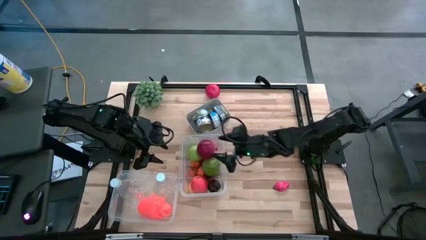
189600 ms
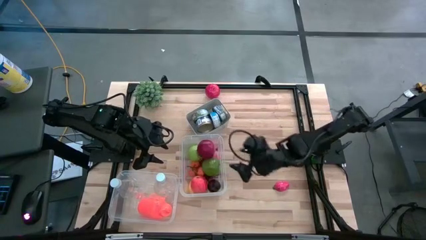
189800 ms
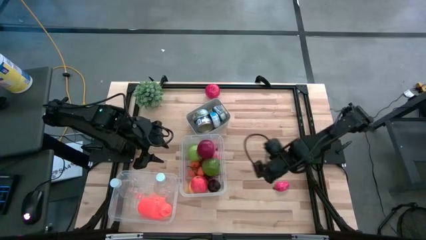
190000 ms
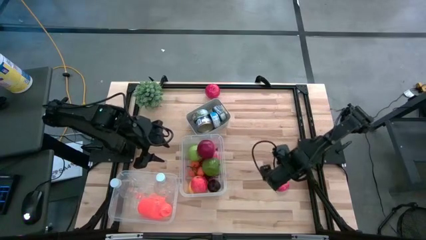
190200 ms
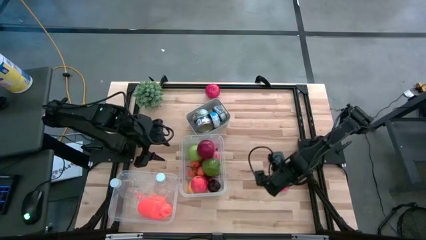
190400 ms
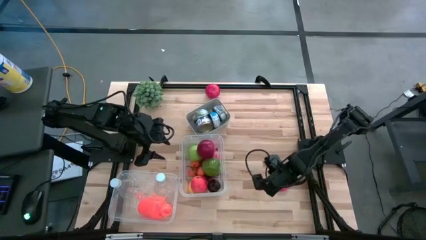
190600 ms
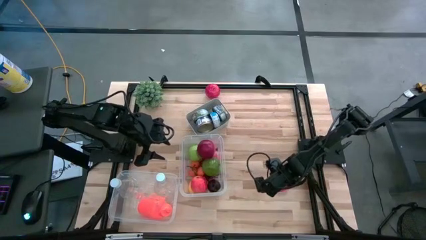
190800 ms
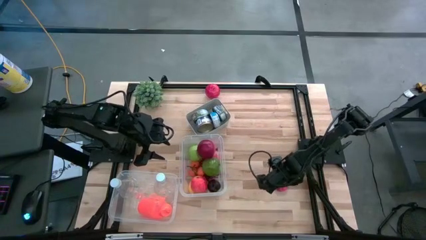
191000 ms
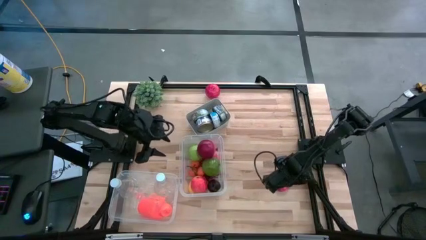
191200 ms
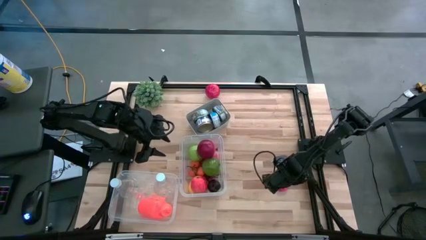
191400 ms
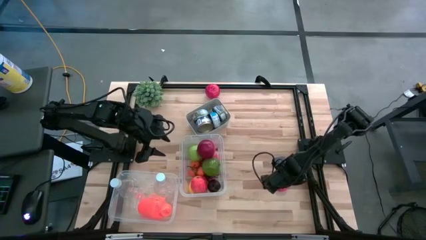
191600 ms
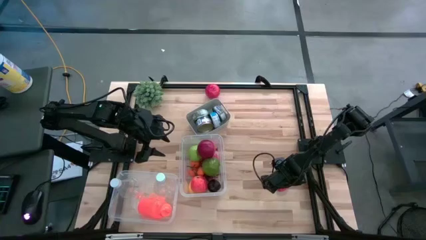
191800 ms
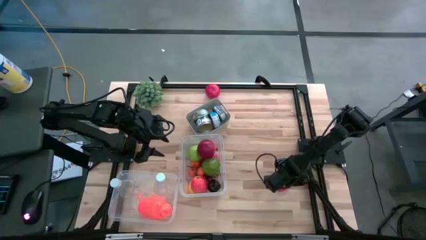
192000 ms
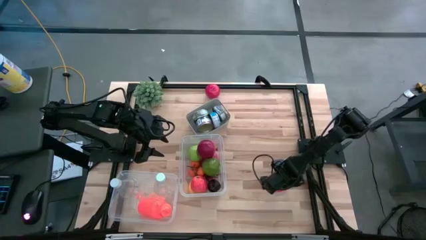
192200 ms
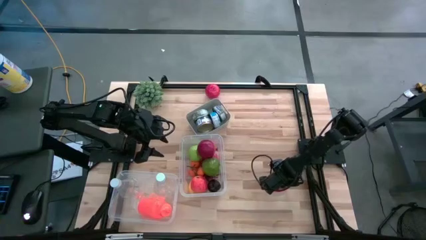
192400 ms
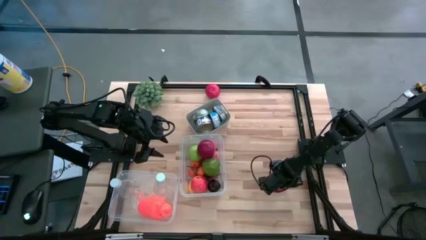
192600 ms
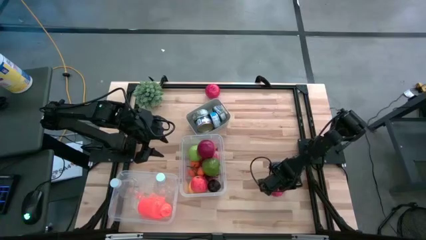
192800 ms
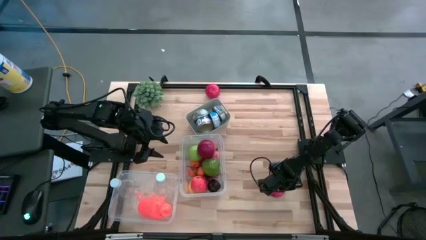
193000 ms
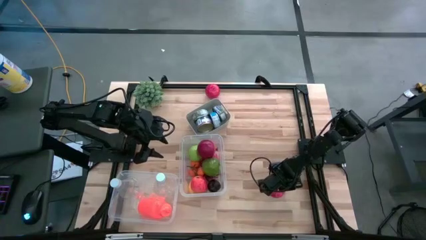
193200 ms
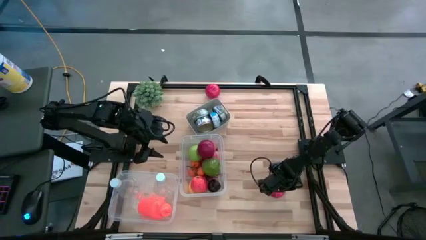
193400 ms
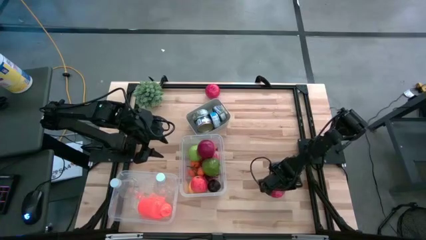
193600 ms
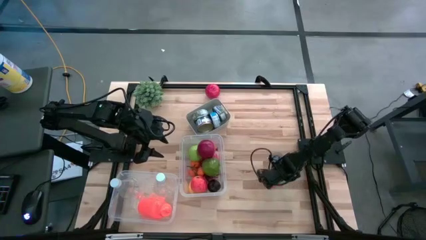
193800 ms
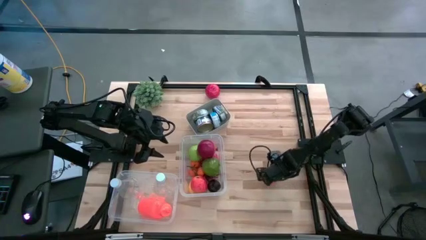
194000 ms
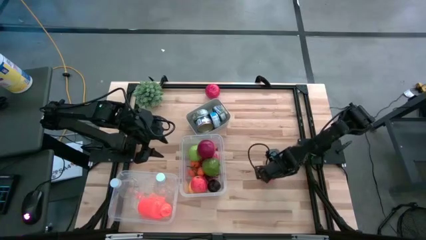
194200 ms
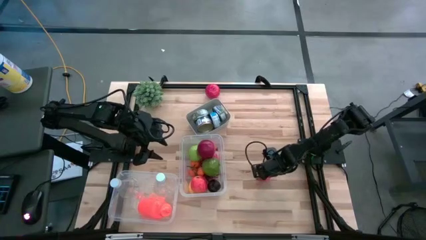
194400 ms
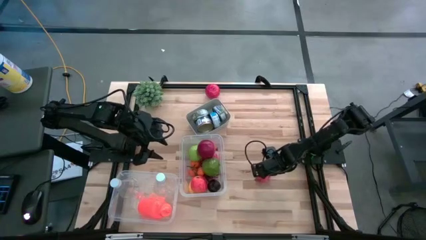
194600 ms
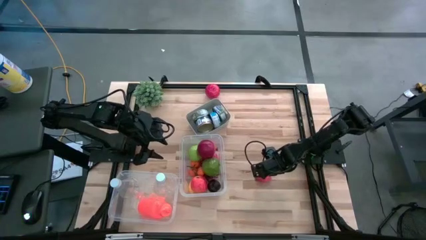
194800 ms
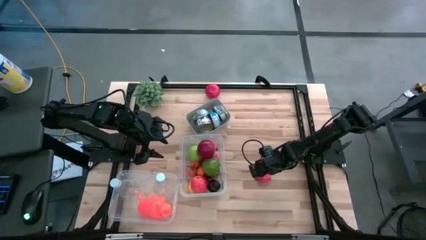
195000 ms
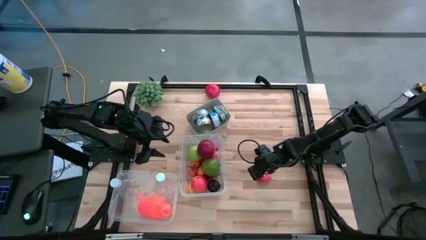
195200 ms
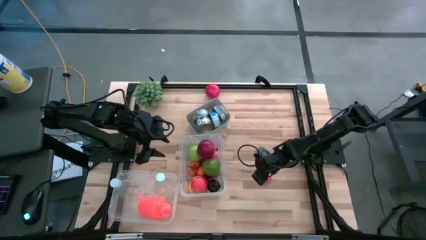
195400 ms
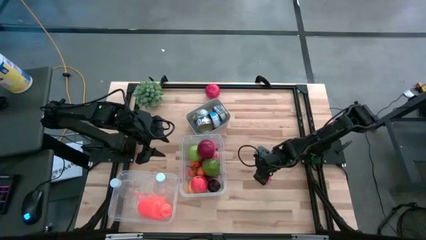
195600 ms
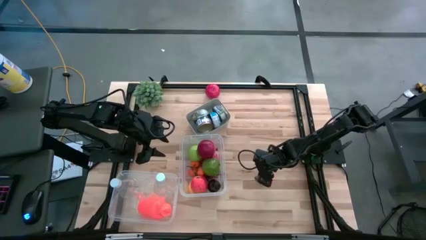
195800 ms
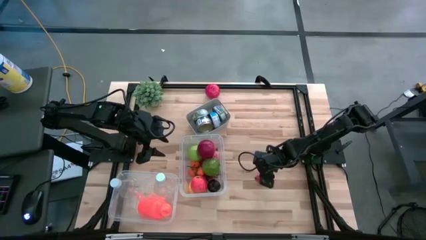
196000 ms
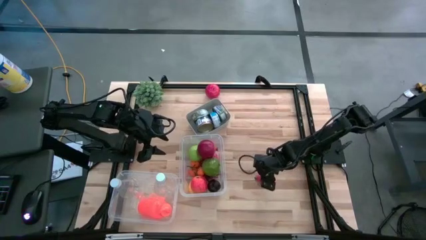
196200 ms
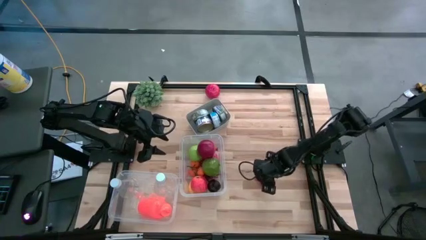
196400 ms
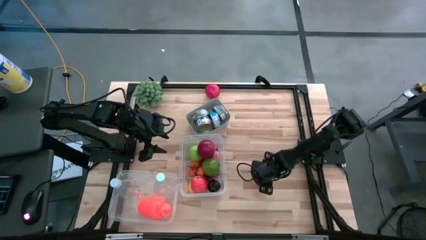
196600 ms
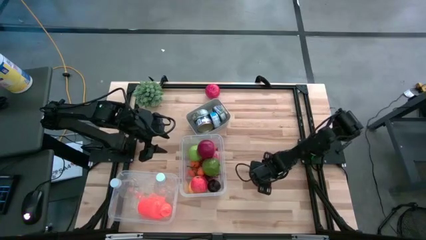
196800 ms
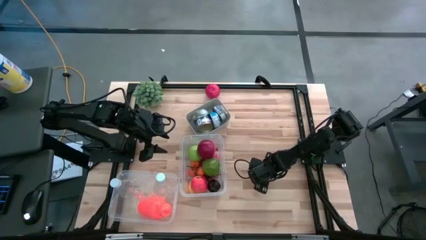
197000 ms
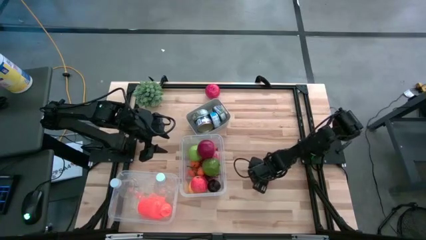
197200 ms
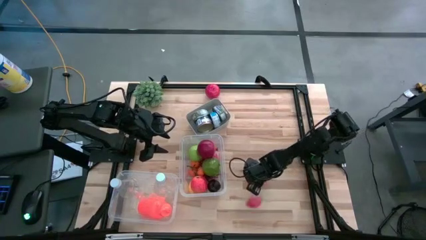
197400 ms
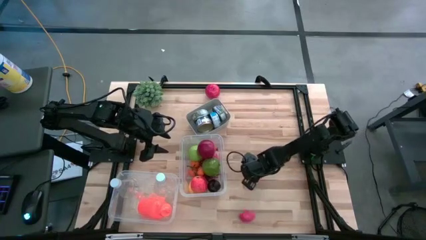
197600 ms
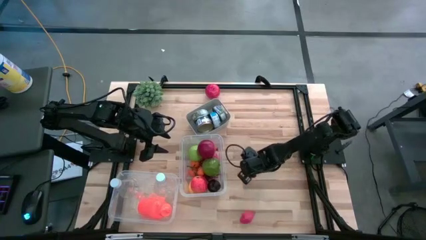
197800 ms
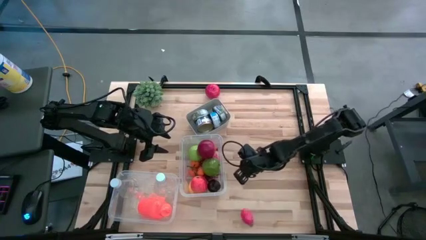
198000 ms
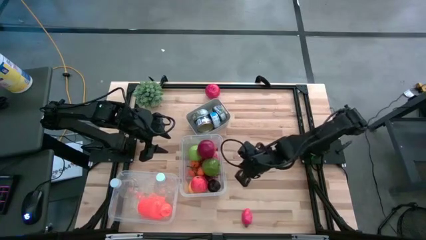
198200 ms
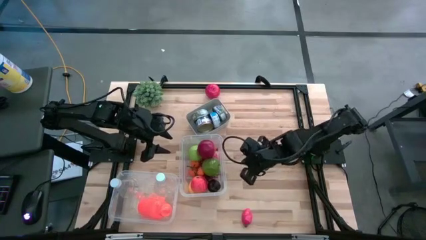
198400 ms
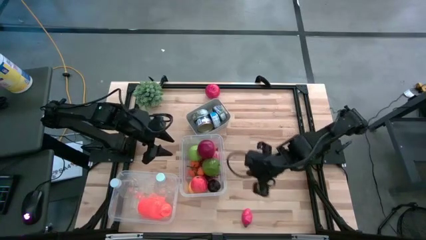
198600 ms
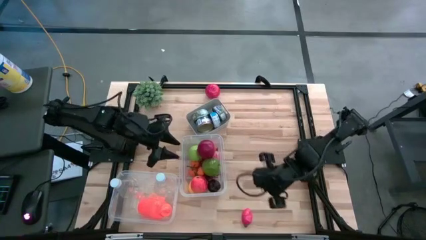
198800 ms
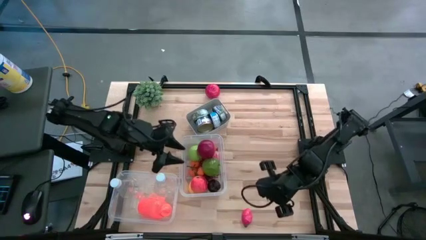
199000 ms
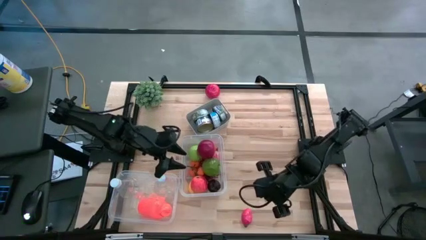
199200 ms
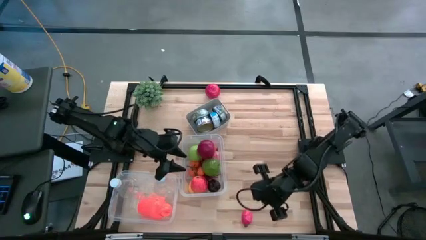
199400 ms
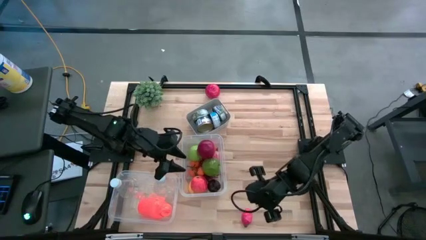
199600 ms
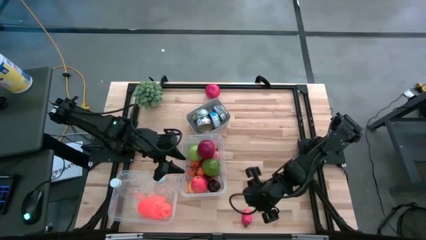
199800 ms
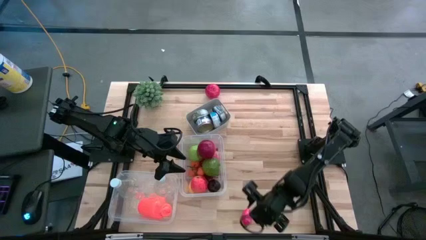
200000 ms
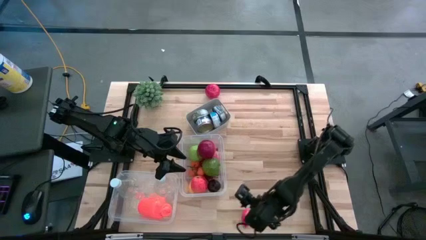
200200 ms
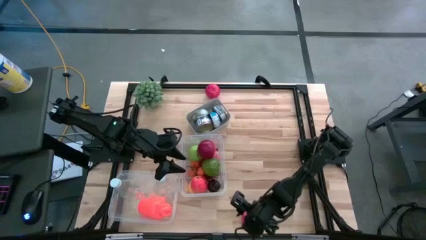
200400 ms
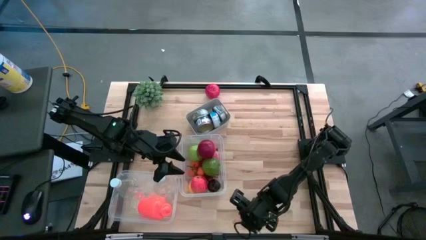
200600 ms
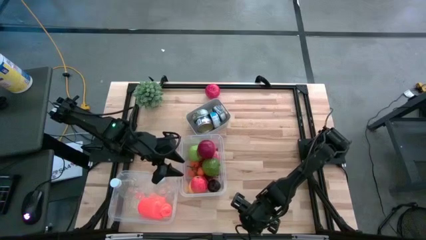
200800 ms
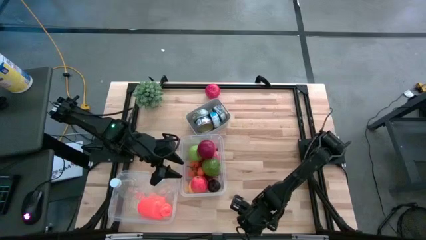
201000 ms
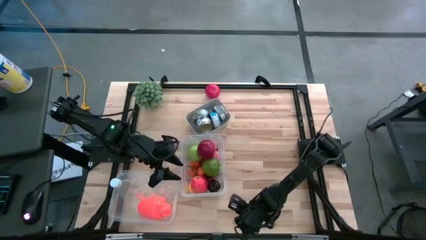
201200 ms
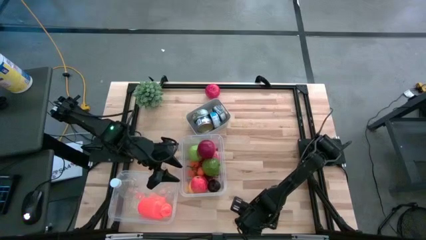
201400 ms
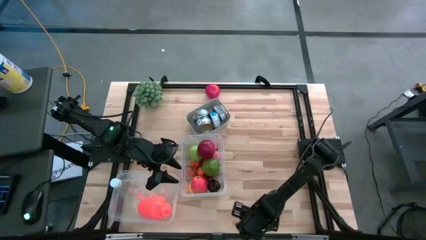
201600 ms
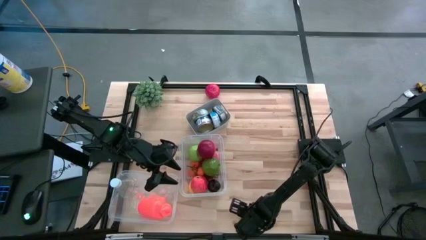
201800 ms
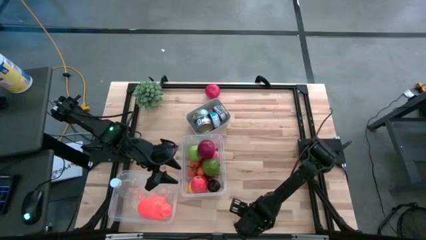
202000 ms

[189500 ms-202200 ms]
Task: Pick & Place Food Item
Put the red dragon fruit into the right transparent bin

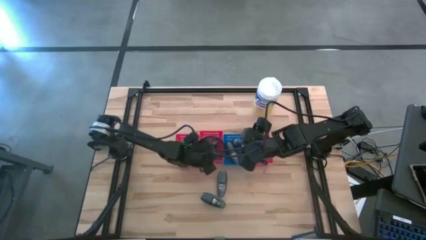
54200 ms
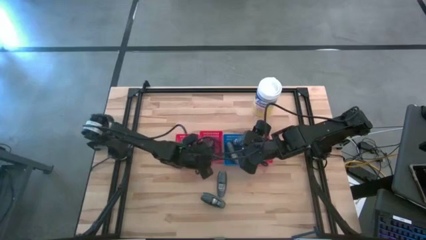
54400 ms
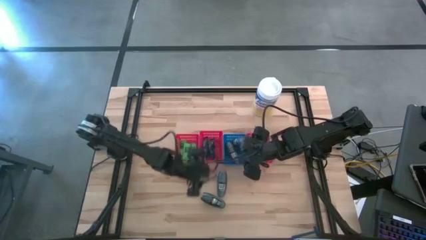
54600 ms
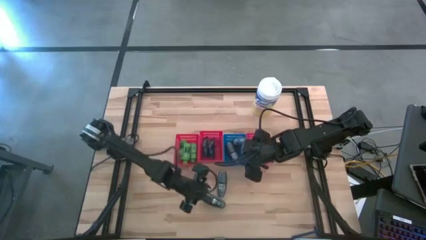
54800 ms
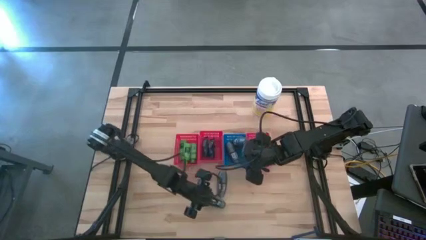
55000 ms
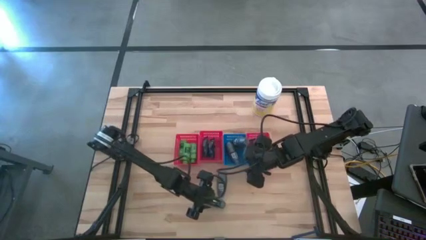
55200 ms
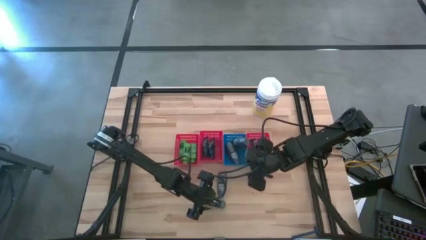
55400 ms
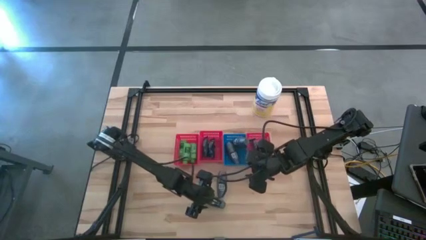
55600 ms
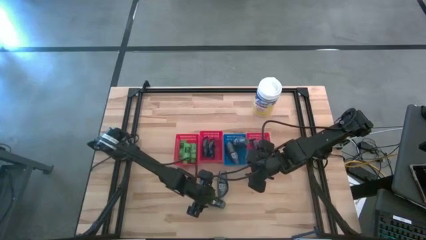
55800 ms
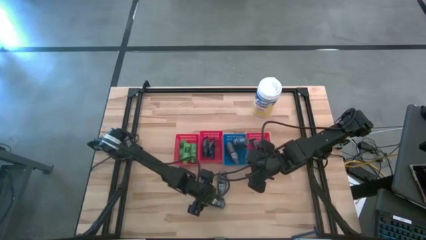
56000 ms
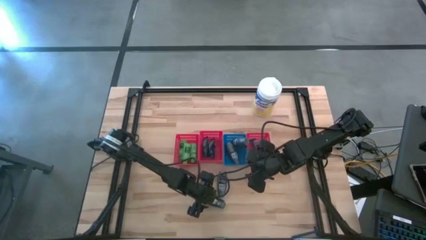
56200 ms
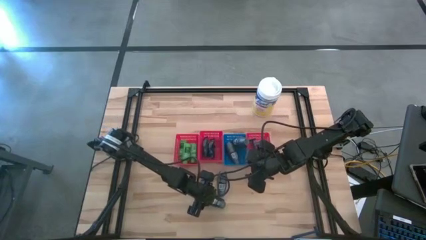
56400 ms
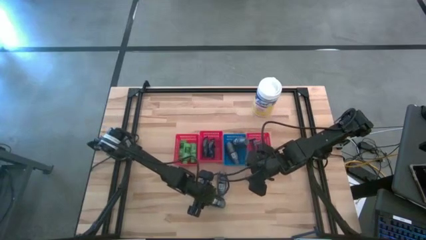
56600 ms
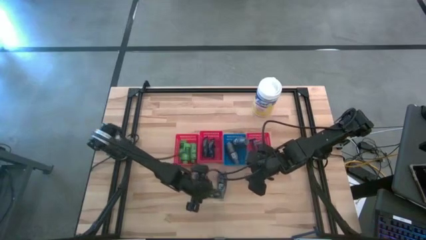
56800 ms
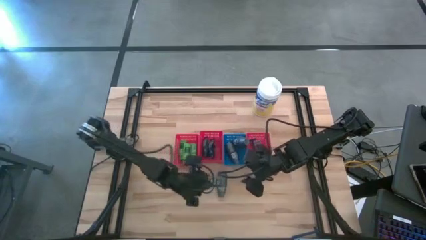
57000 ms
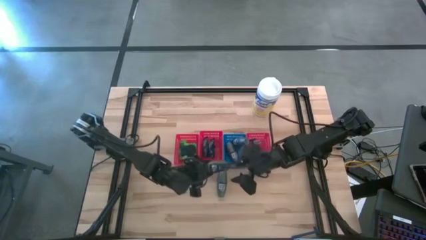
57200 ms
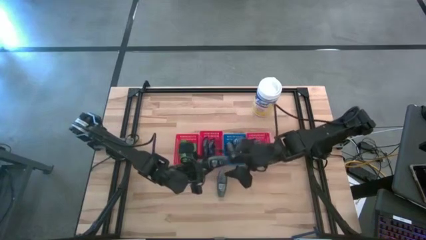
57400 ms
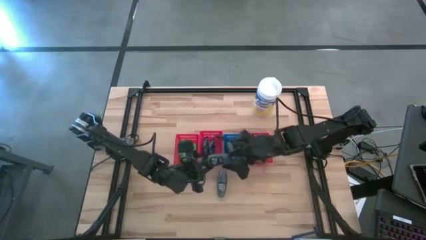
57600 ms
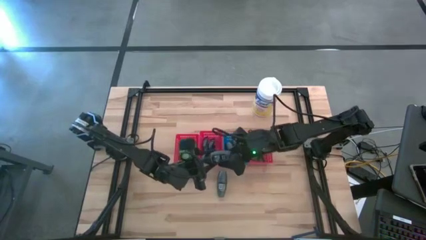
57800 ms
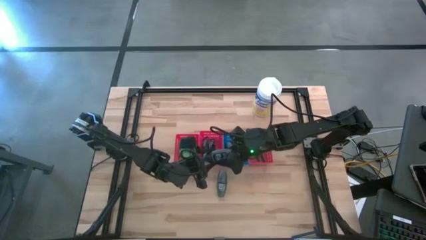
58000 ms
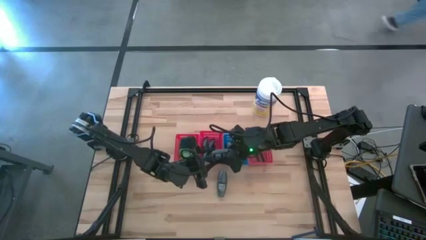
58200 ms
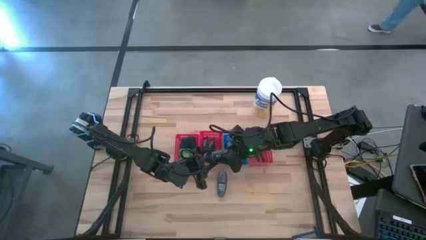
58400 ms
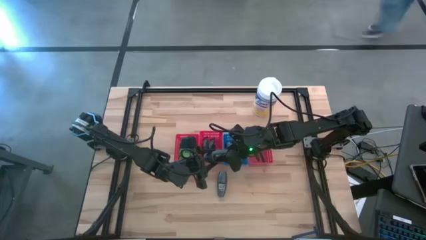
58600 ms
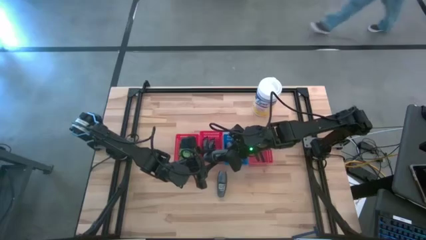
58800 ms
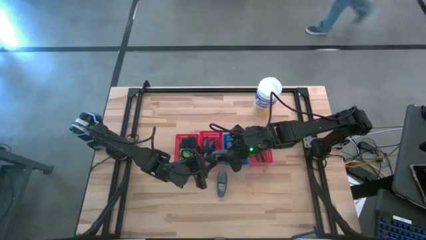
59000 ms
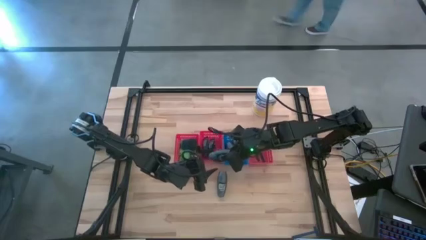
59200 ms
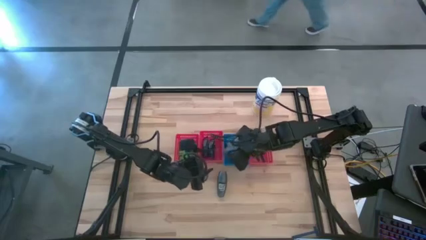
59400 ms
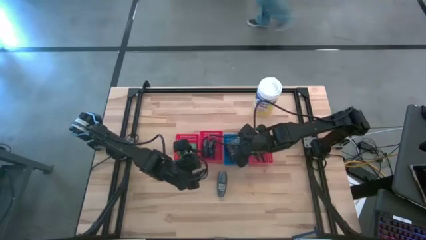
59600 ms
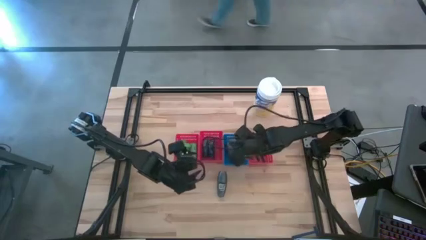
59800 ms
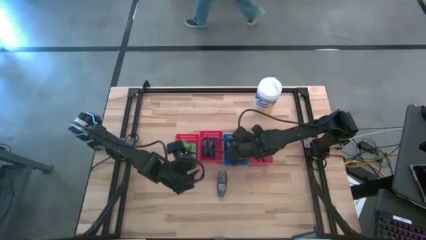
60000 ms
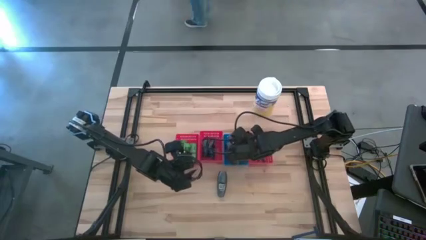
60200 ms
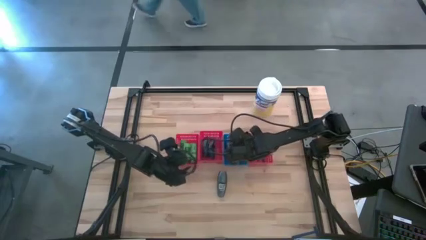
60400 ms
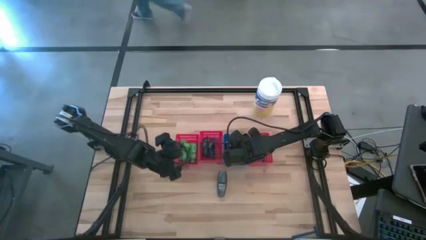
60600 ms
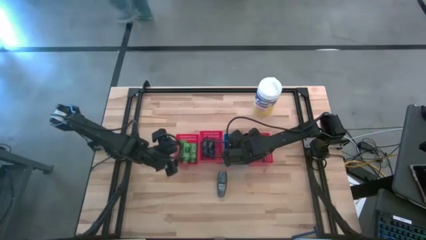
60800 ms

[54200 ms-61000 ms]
Task: Pick & Place Travel size toiletries
Put the deodorant into the blue bin
